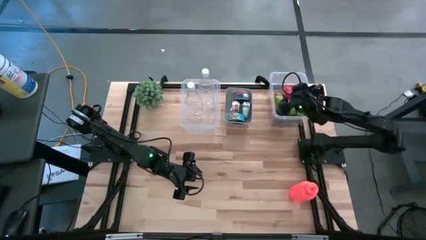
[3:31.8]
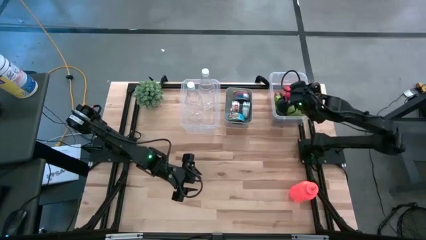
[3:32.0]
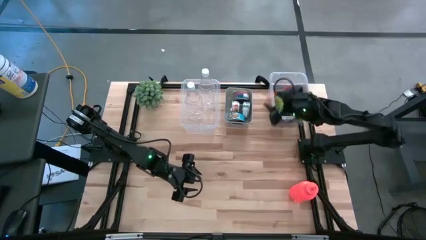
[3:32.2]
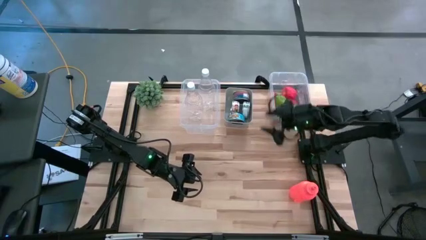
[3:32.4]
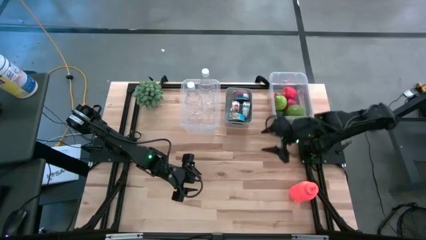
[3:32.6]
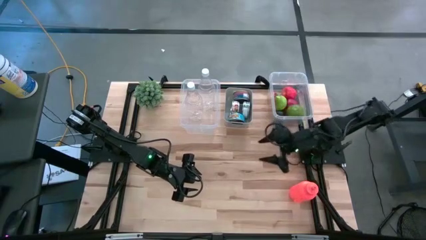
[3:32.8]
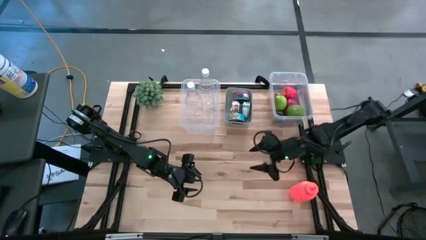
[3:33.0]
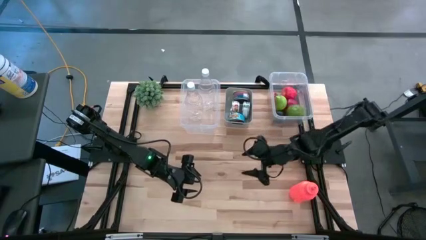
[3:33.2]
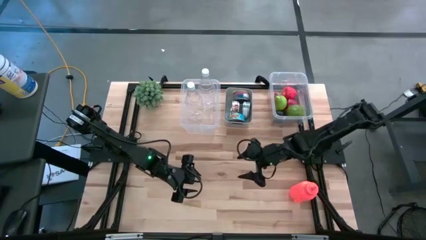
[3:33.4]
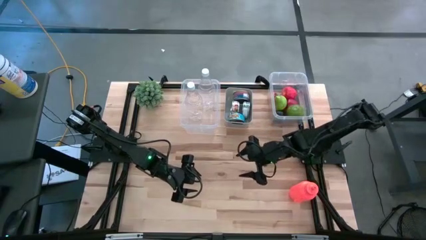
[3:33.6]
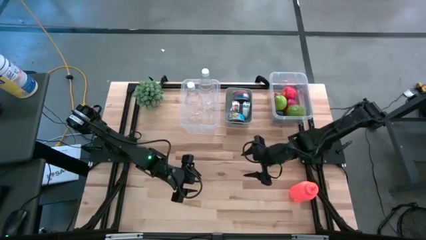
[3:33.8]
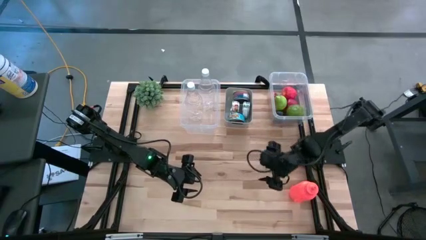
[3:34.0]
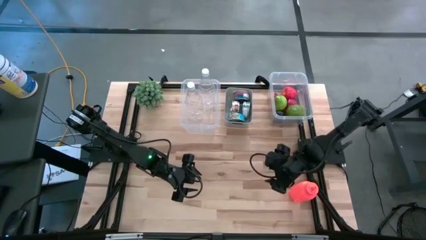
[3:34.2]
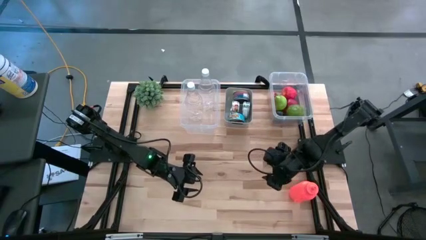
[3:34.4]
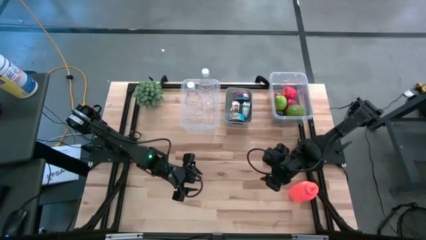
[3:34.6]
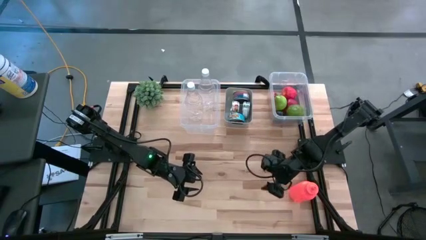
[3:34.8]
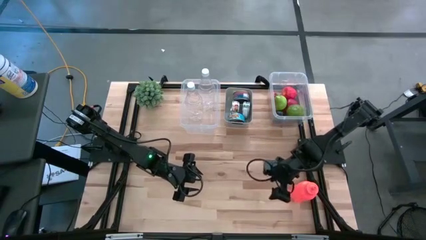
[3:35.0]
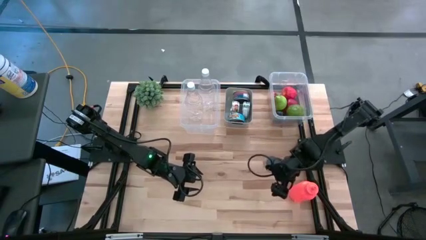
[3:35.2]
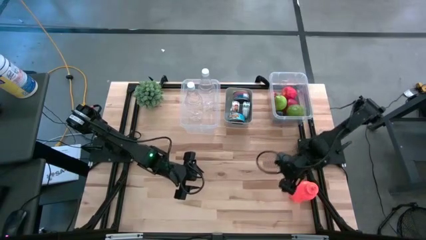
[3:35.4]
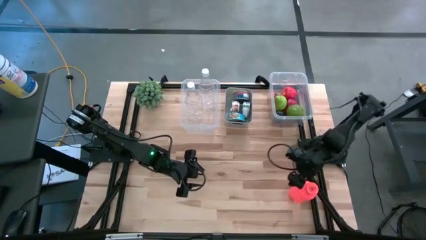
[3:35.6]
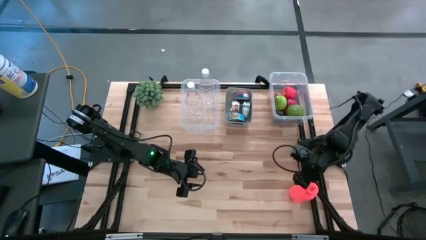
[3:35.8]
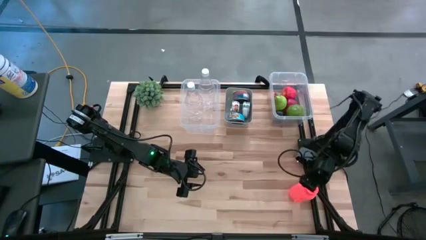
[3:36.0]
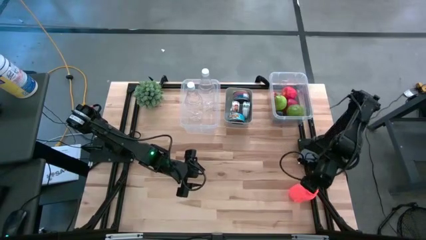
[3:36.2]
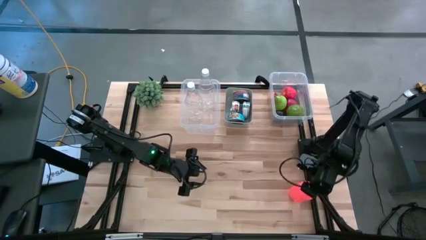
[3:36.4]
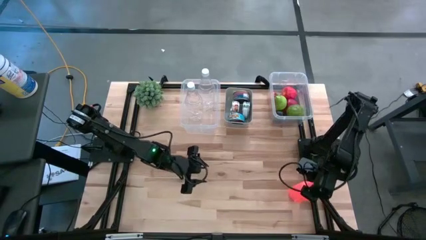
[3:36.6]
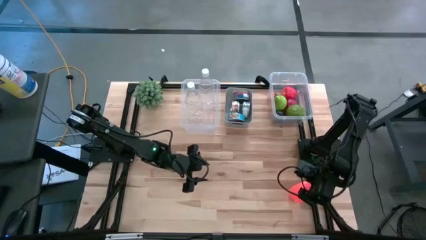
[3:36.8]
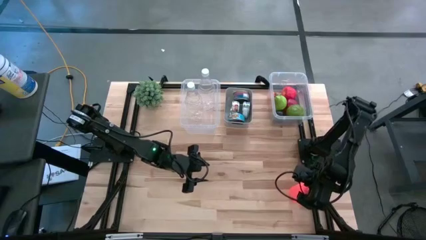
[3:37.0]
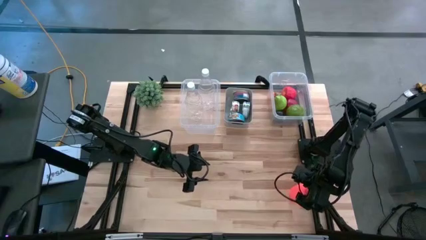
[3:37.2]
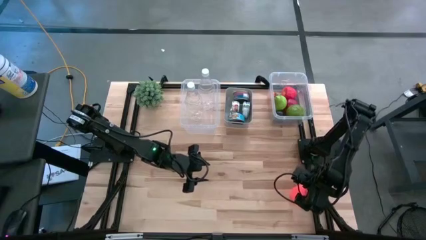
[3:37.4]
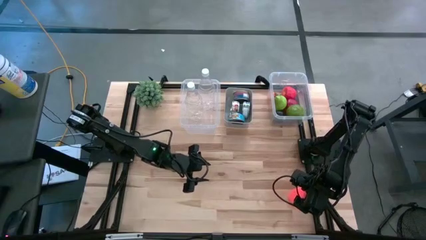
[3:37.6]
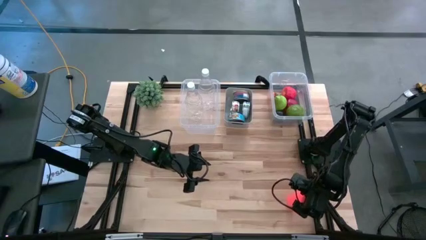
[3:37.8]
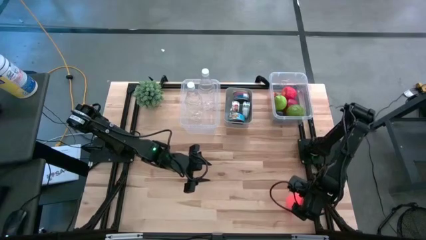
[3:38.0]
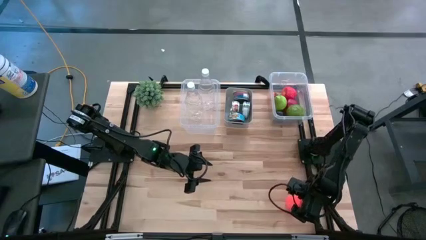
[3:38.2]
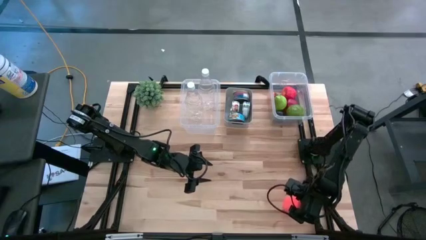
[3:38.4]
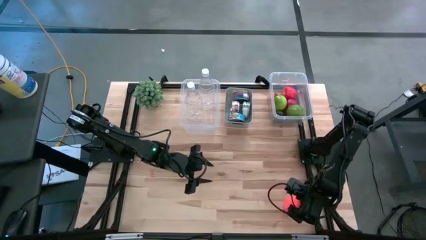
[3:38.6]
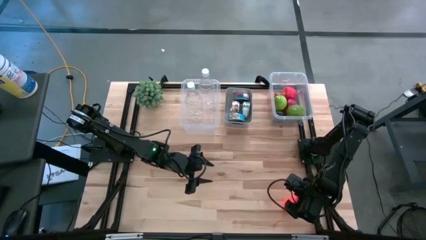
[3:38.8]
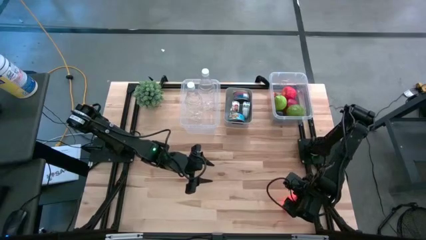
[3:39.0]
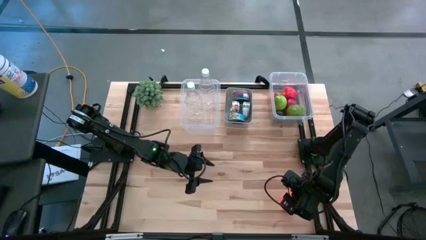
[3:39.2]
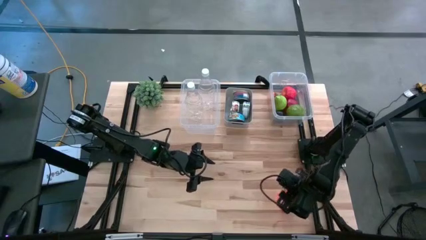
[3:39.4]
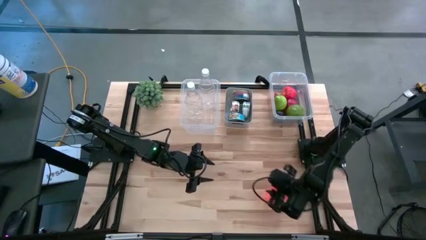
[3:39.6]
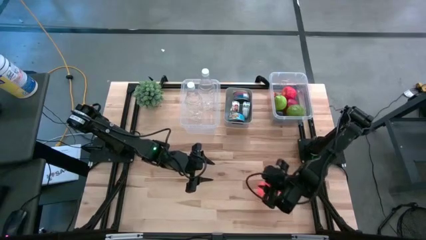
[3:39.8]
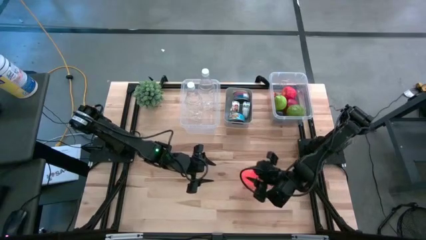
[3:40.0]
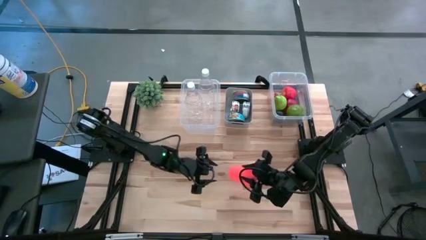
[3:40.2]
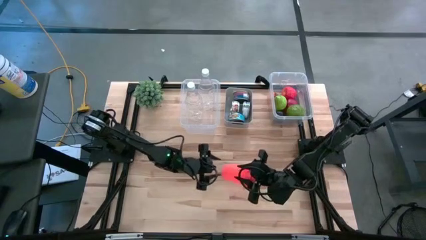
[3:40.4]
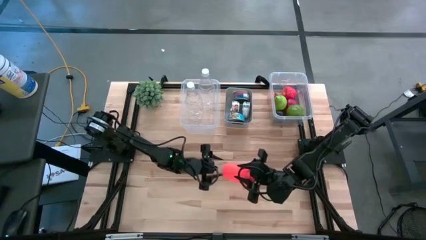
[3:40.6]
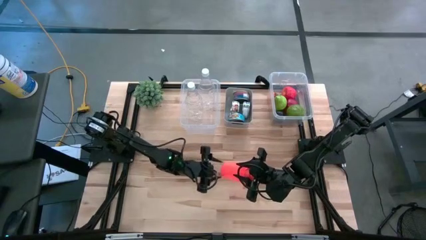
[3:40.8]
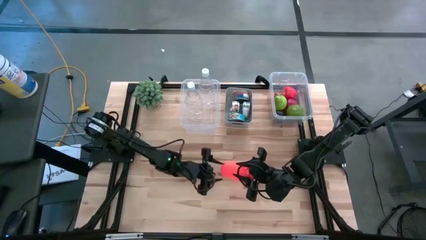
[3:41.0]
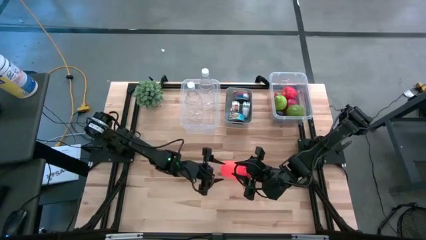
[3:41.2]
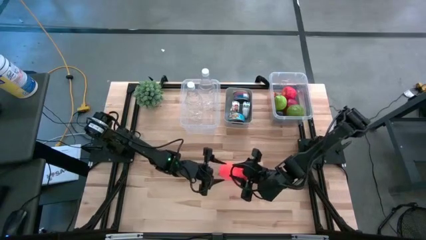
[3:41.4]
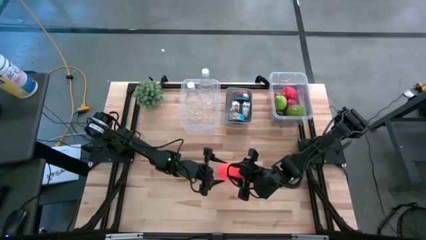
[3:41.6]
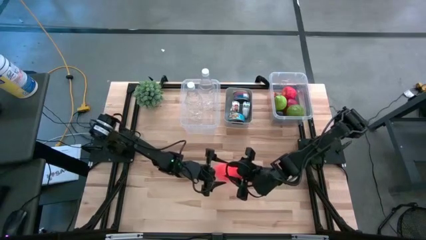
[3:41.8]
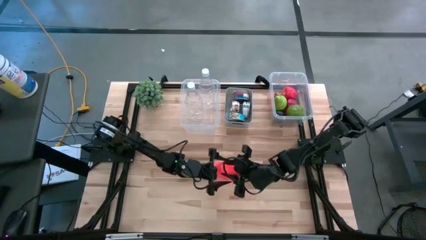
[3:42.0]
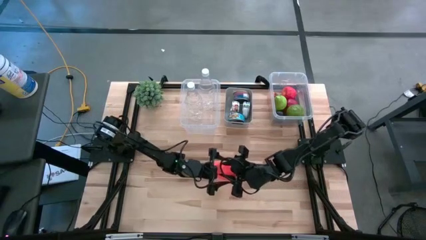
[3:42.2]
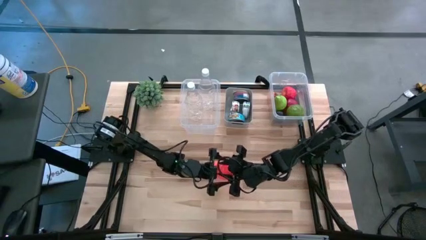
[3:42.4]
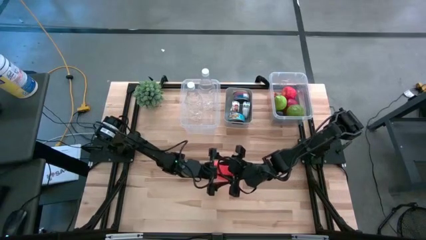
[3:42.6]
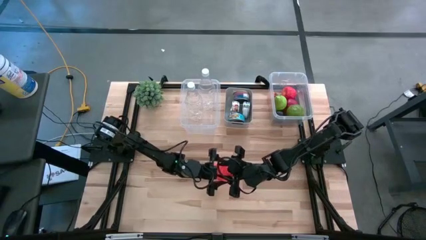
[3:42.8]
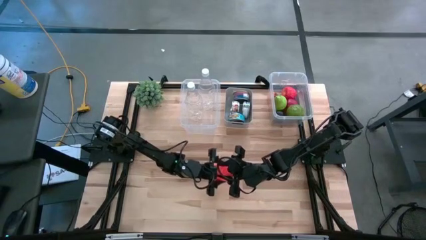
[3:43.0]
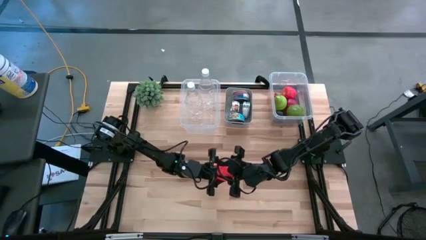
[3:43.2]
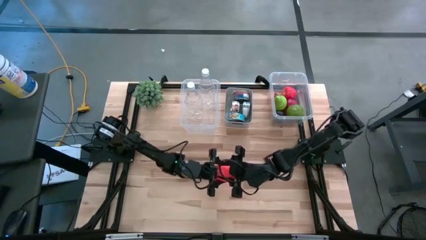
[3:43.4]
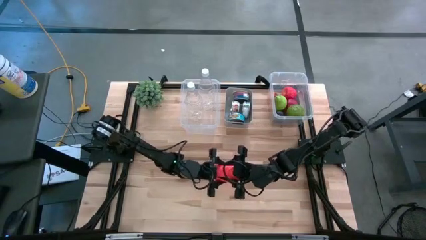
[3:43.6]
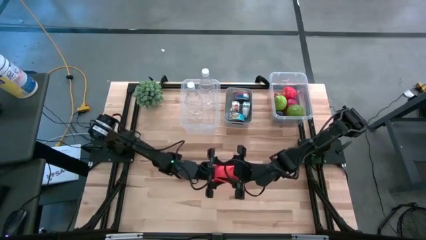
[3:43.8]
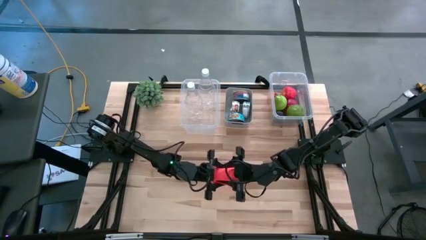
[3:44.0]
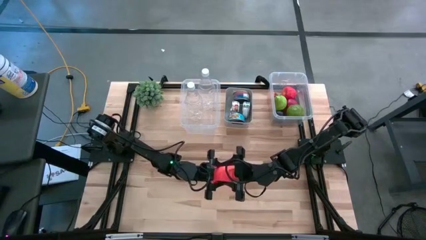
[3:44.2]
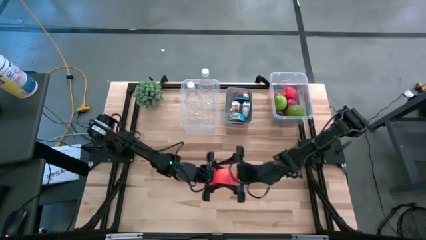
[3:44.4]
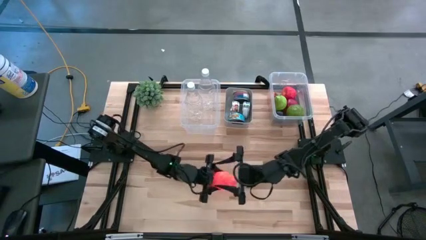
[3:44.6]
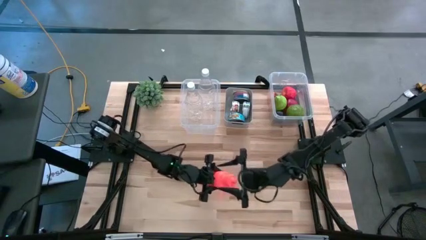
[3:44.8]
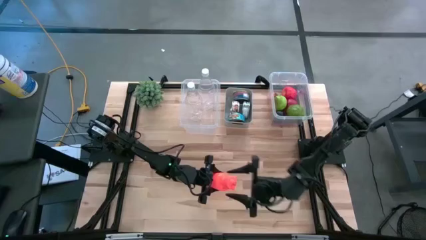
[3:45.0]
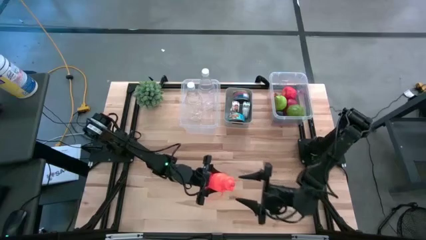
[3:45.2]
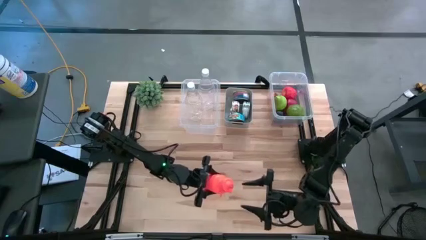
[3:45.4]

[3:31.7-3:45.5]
Task: Pick & Place Food Item
Put the orange bottle into the left transparent bin

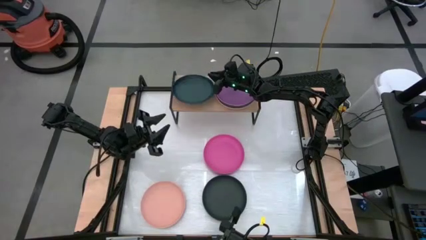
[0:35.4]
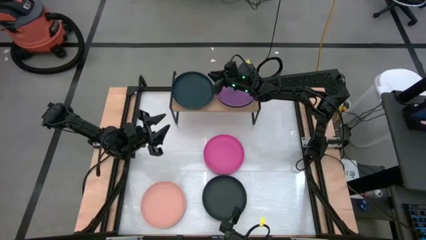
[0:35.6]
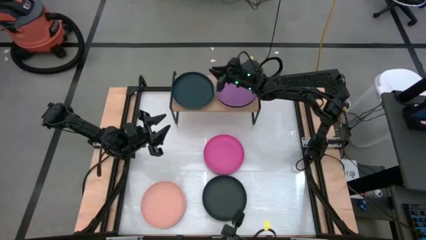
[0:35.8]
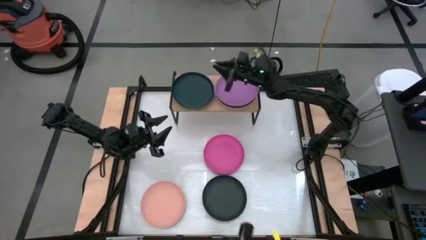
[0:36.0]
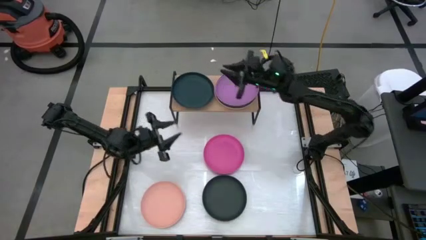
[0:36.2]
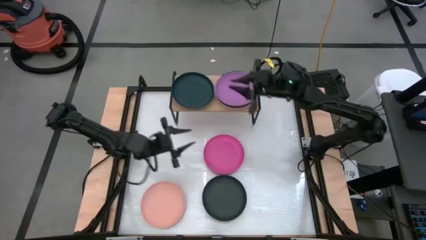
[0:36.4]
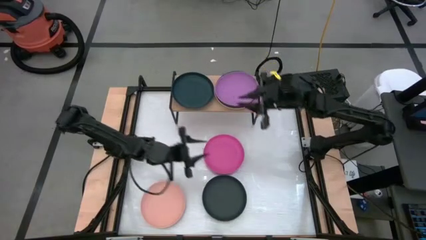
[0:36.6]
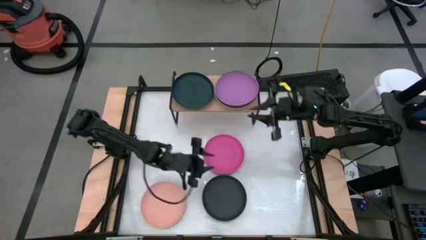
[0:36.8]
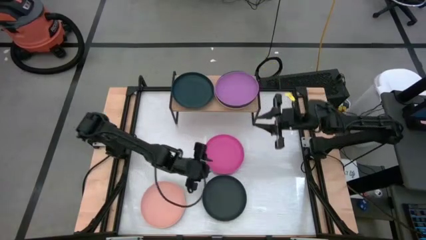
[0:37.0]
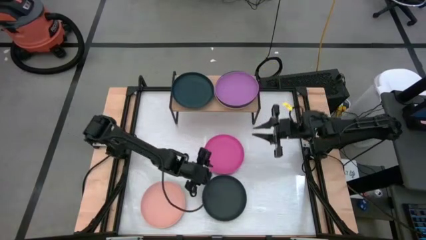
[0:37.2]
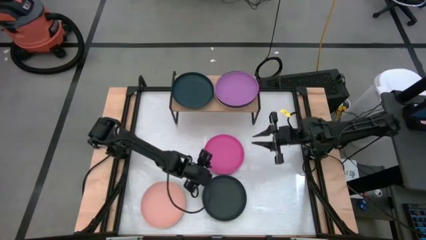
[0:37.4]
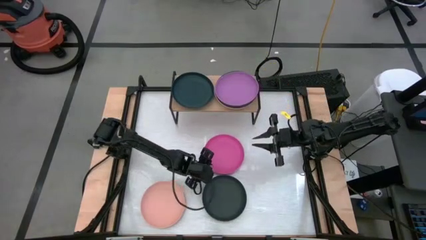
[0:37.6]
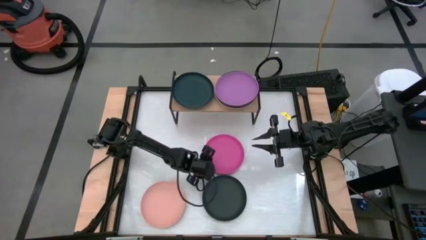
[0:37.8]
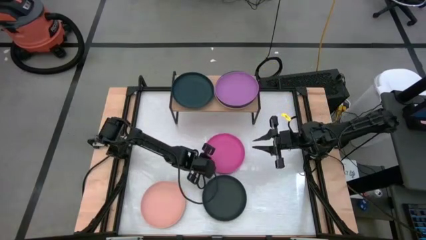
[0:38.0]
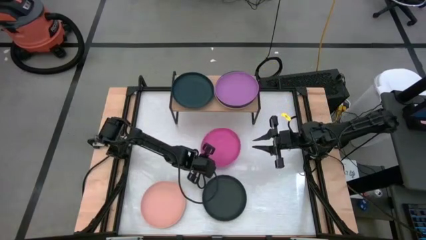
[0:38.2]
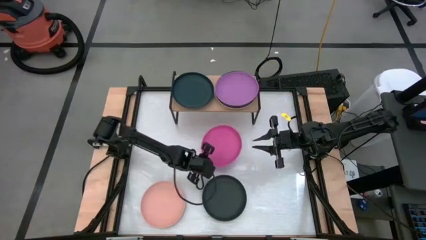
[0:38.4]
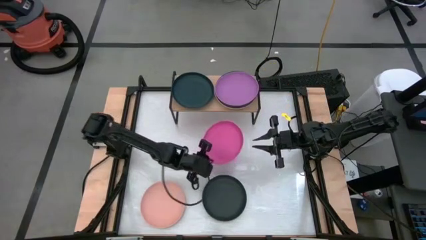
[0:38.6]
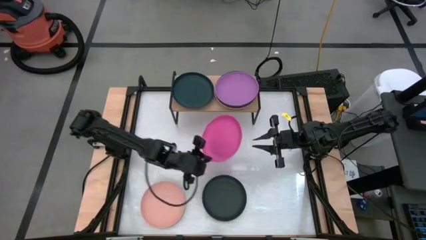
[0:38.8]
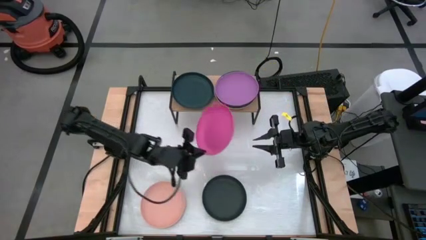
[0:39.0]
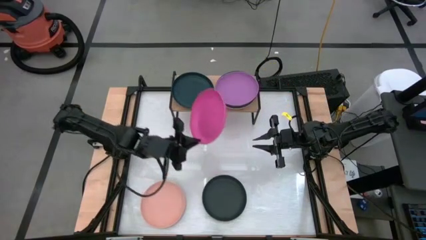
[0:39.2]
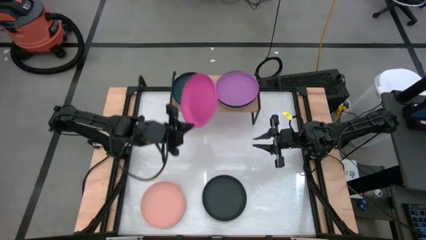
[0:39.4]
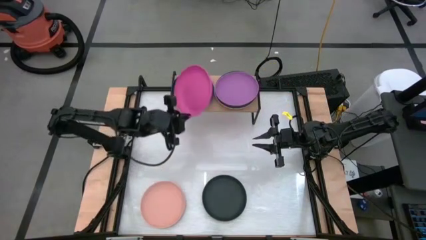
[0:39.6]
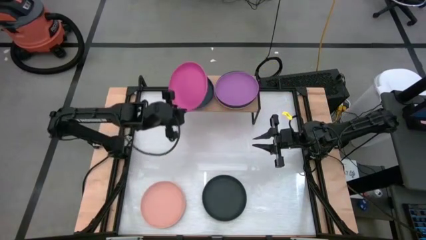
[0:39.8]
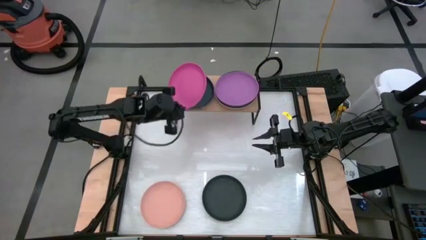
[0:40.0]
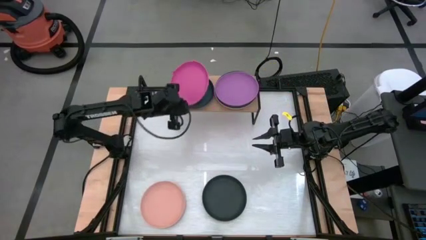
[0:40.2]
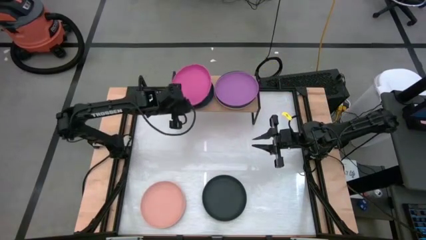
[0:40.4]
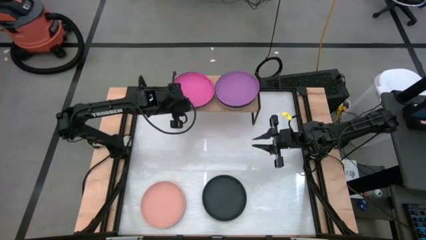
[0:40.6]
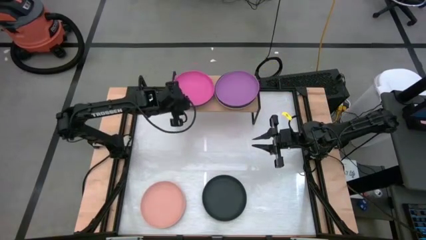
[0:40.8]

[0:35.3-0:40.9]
Task: Place and stack plates onto a shelf
Stack the pink plate on top of the dark green plate on the shelf
